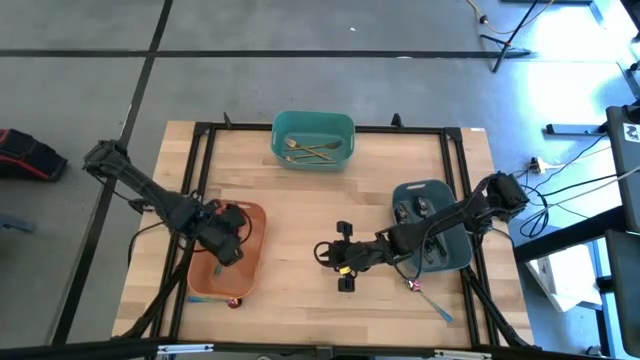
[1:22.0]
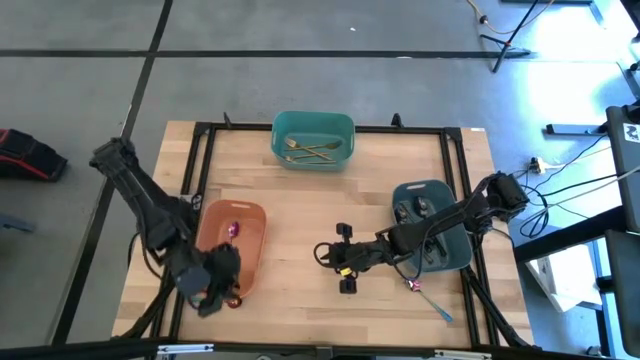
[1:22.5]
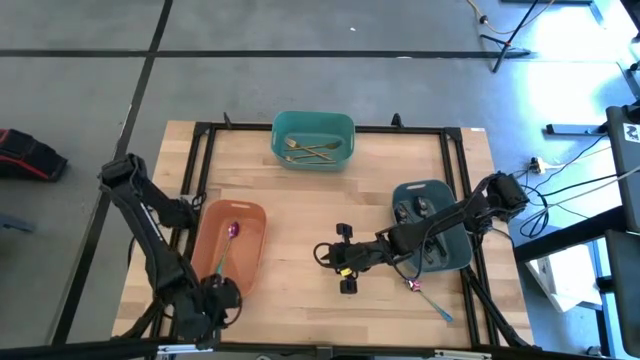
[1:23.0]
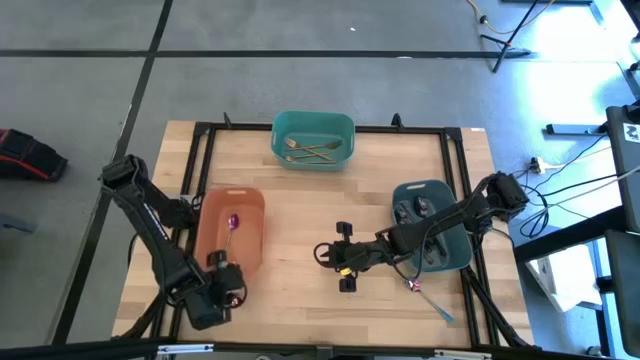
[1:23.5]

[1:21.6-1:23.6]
Task: Sort silverware by color (type)
Adjust the orange bin

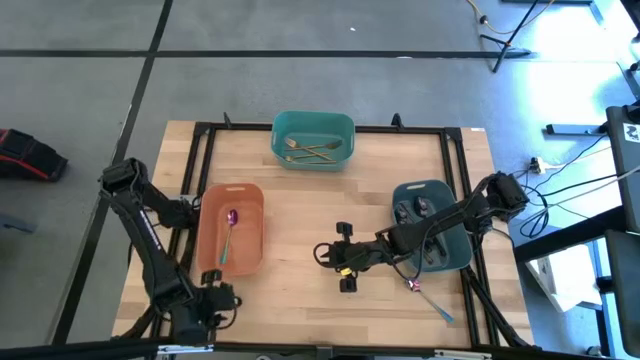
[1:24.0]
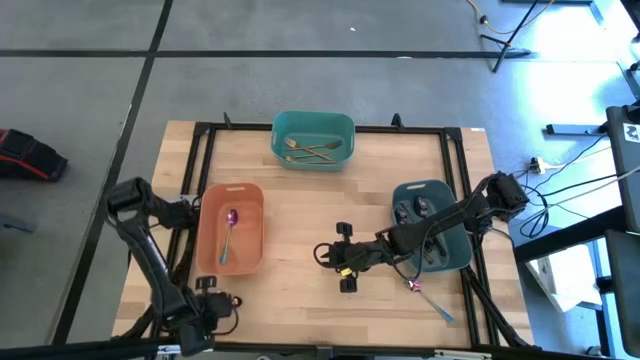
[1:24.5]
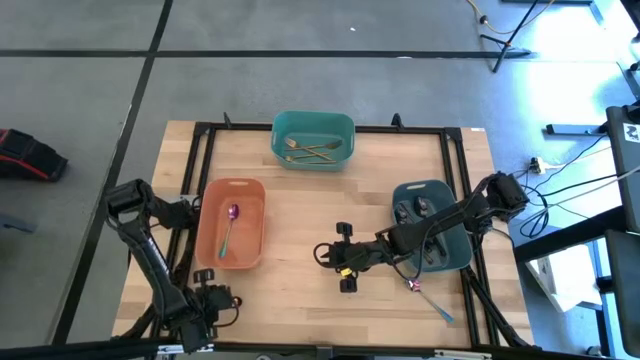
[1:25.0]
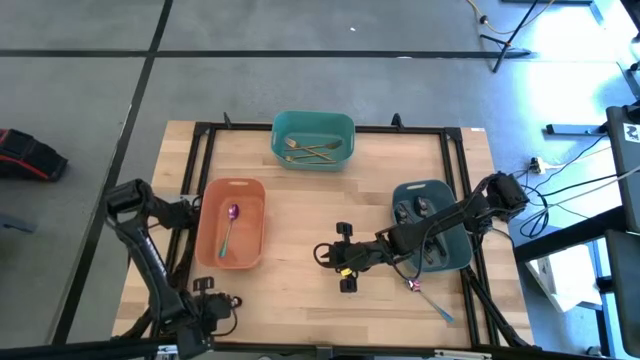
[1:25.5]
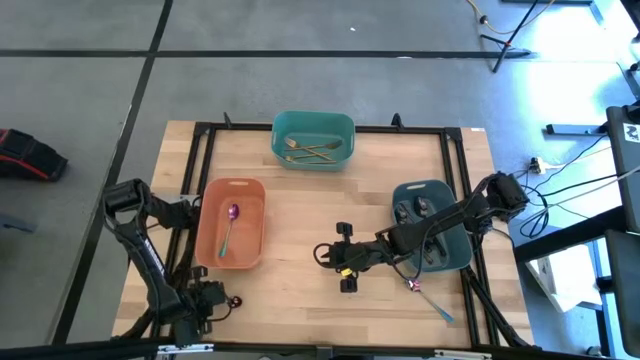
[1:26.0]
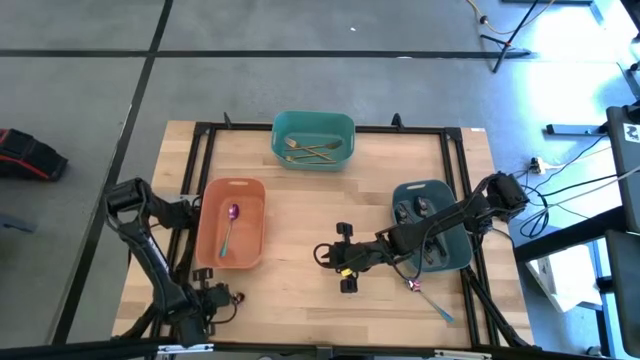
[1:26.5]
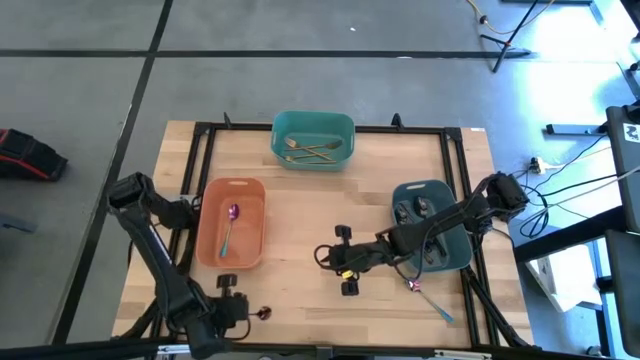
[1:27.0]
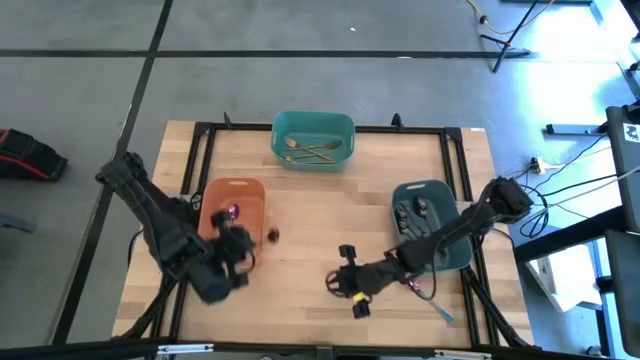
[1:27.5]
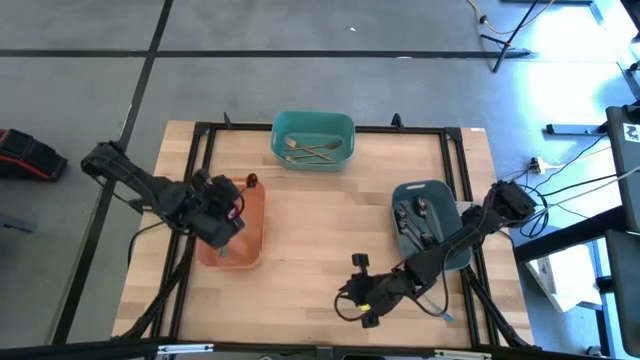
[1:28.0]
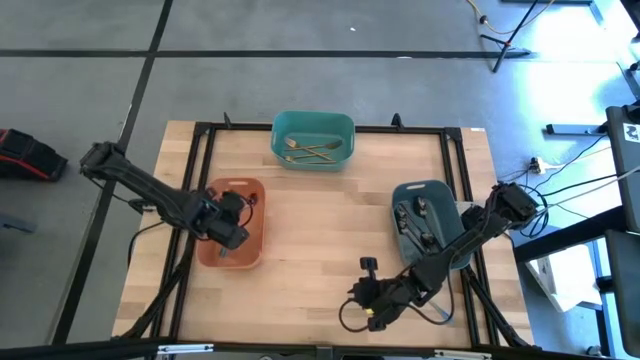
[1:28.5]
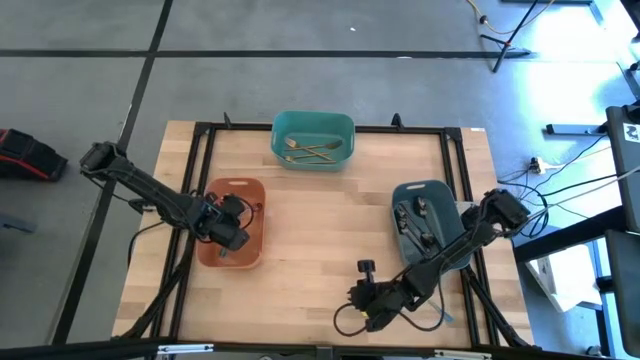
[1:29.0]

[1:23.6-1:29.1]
Put the purple spoon into the orange bin

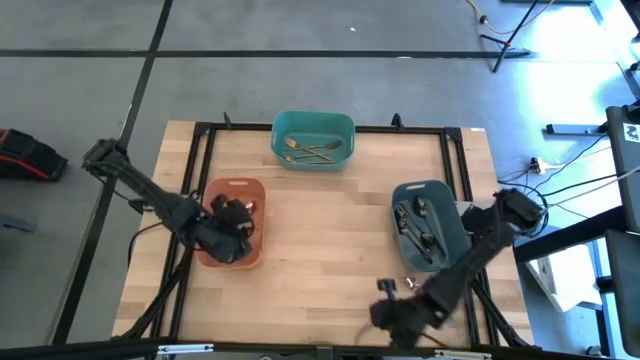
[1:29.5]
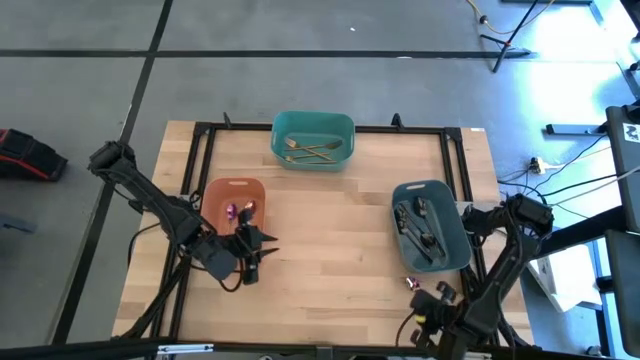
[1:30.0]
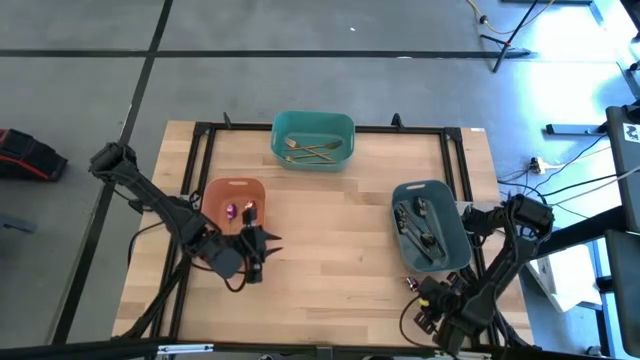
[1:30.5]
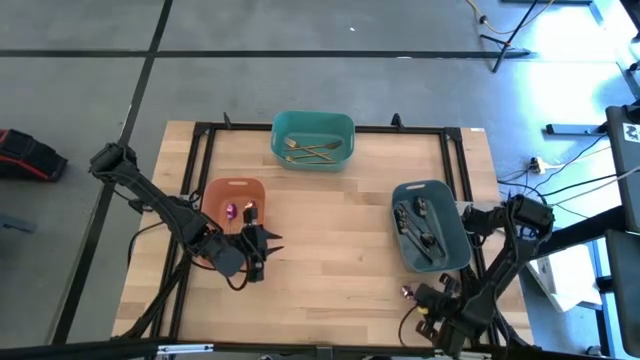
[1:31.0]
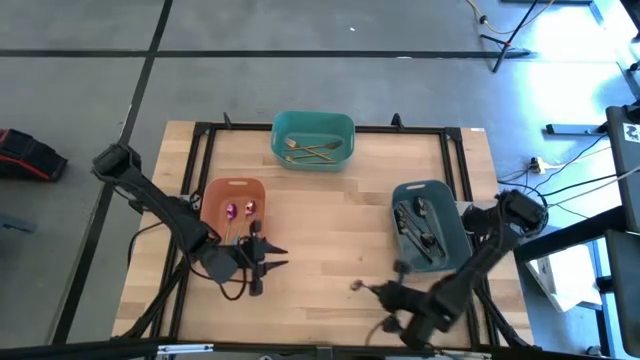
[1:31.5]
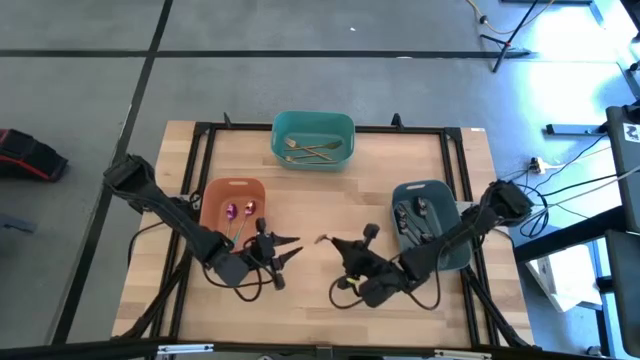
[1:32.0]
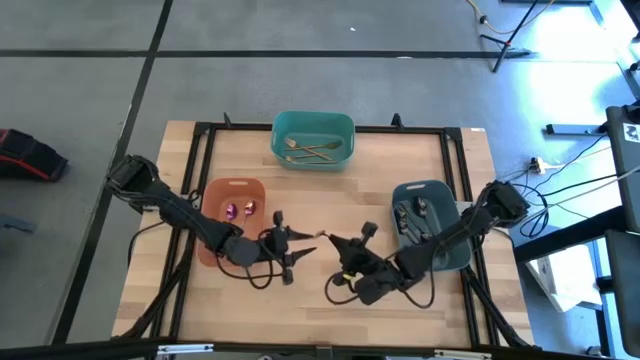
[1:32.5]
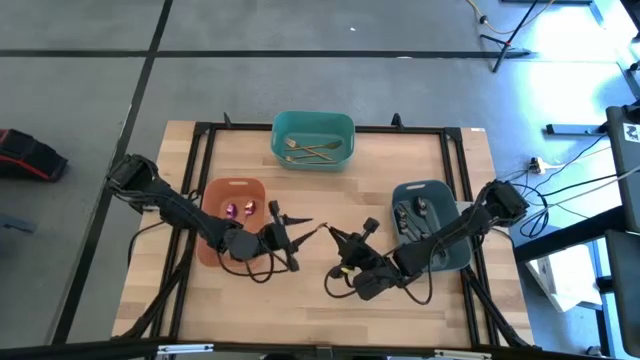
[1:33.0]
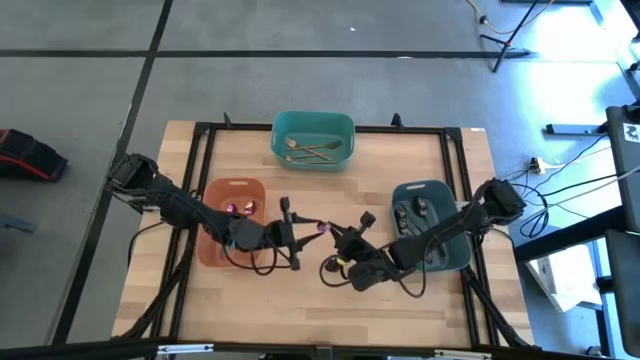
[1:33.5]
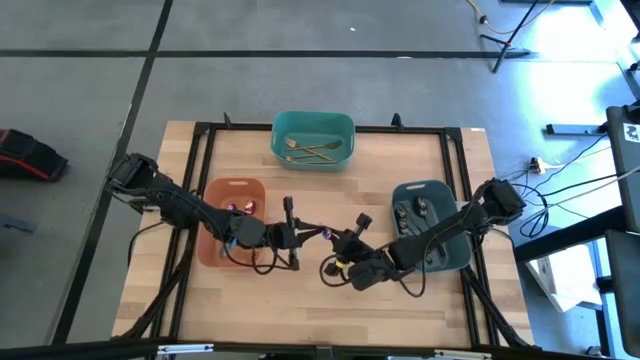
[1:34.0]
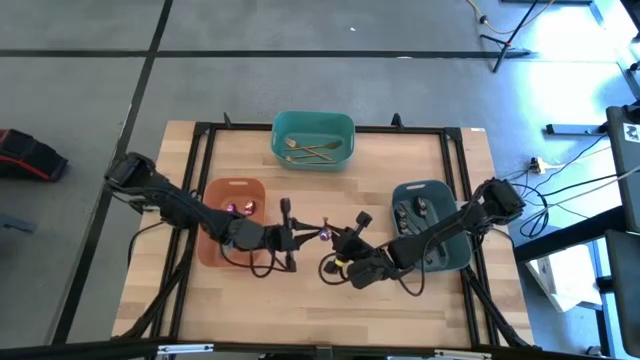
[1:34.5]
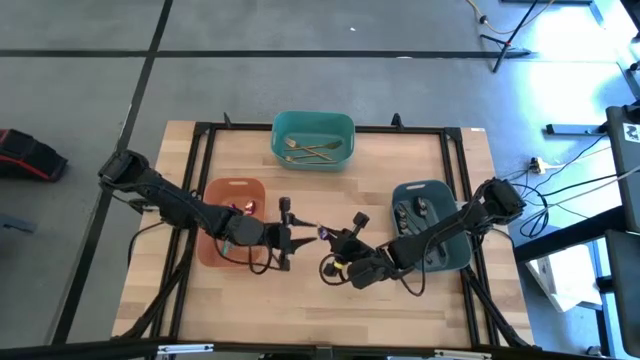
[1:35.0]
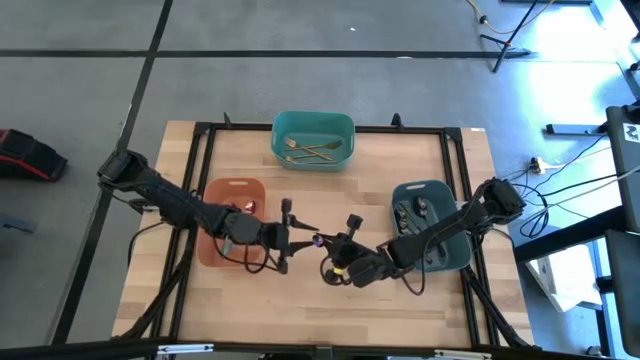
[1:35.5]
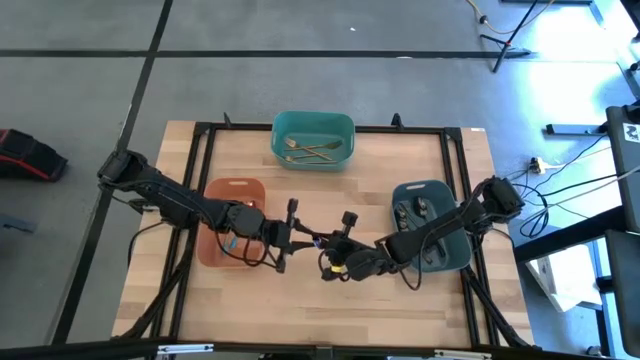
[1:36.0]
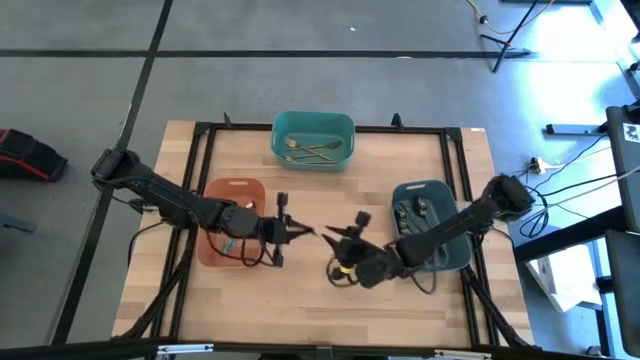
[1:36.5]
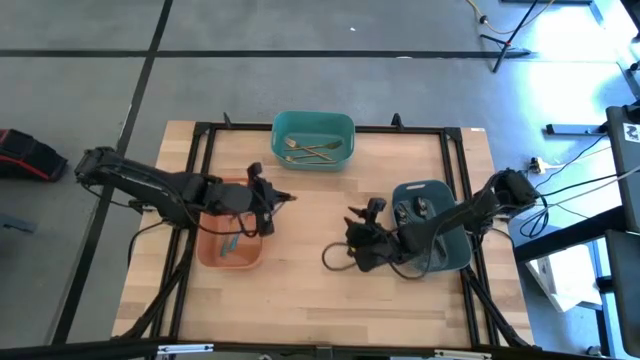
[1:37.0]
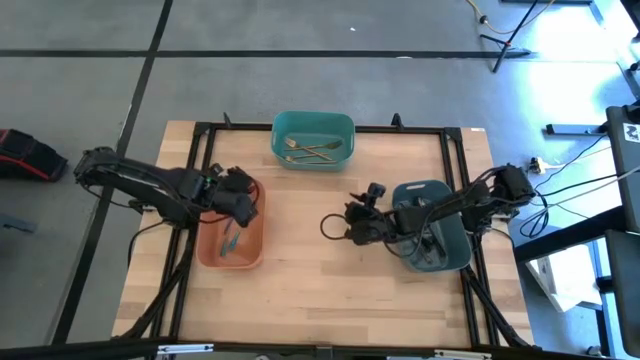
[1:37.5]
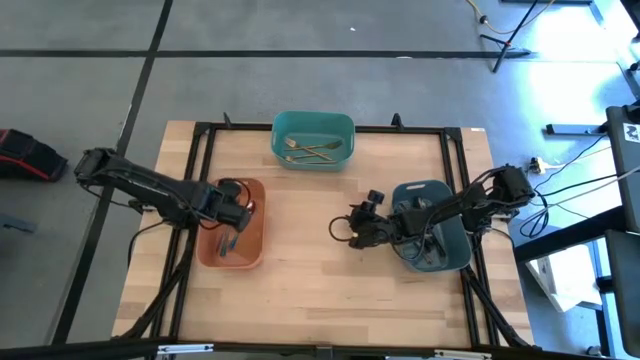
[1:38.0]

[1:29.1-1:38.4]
Put the purple spoon into the orange bin

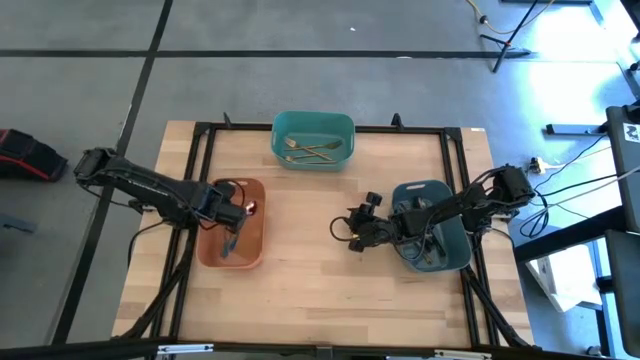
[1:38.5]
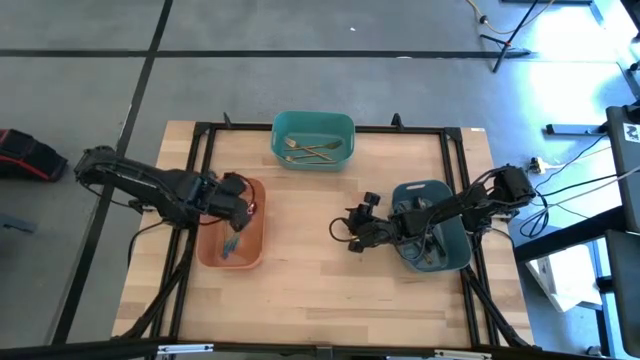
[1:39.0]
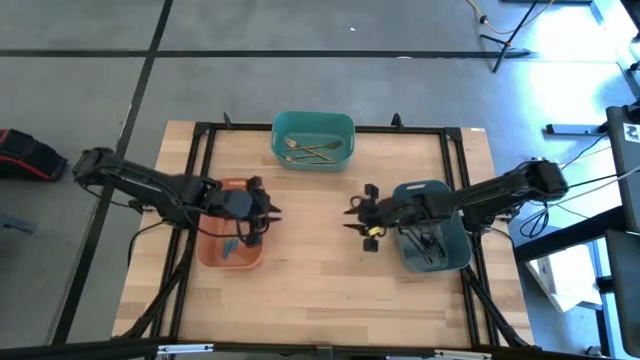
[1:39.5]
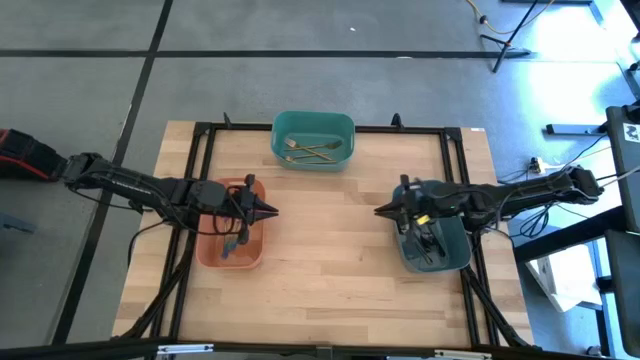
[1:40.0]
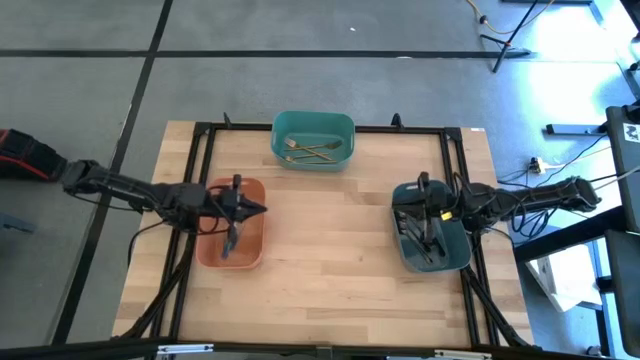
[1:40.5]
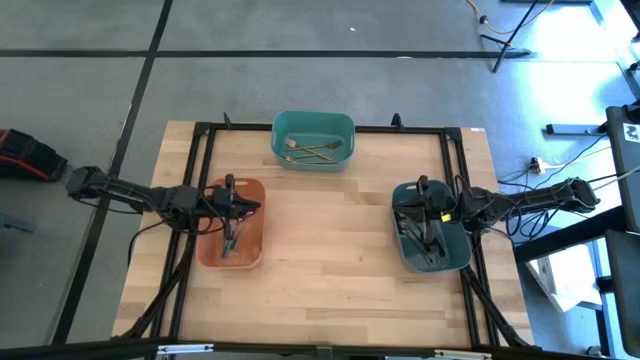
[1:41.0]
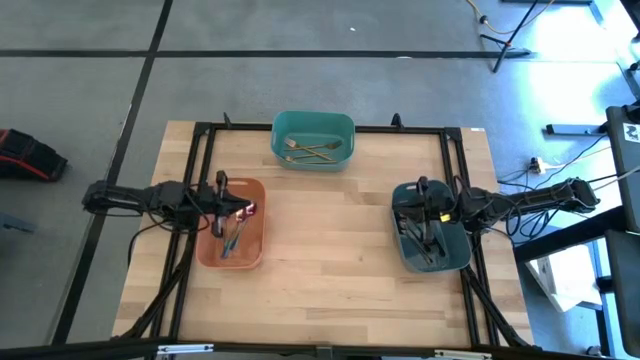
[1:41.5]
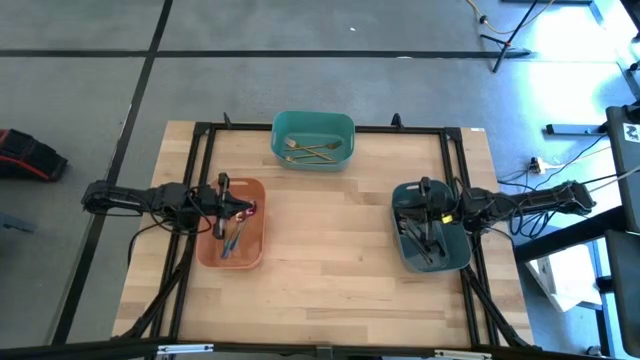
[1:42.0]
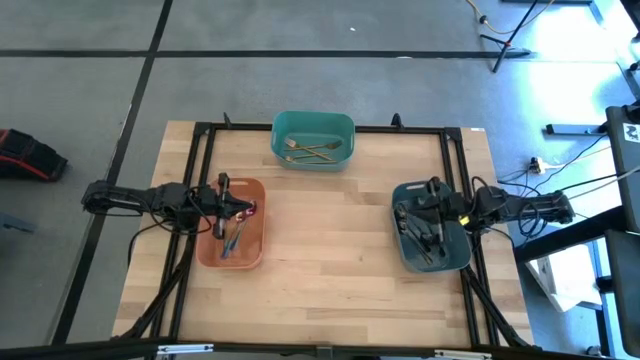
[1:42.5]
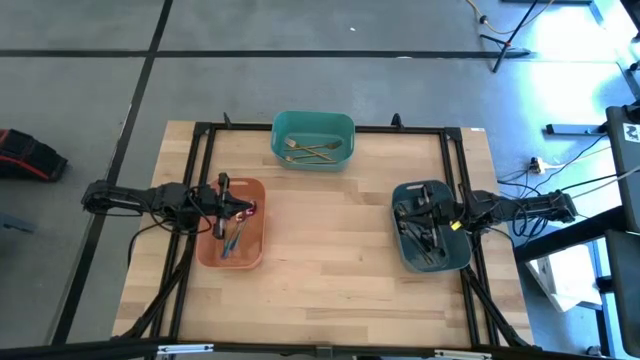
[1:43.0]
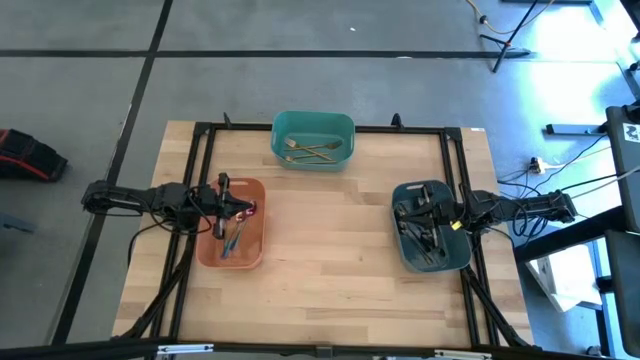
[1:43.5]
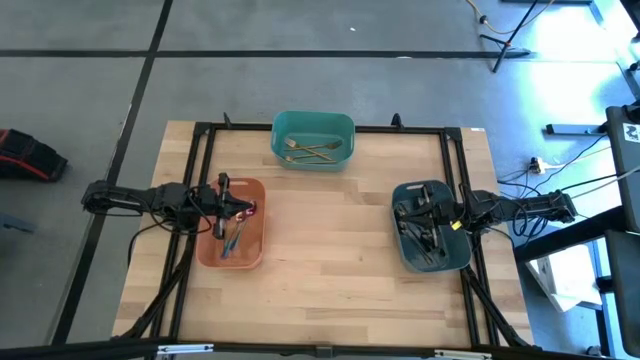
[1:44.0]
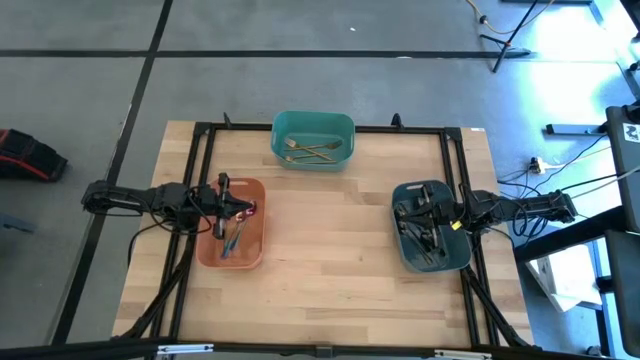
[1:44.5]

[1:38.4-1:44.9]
Return to Home Position
